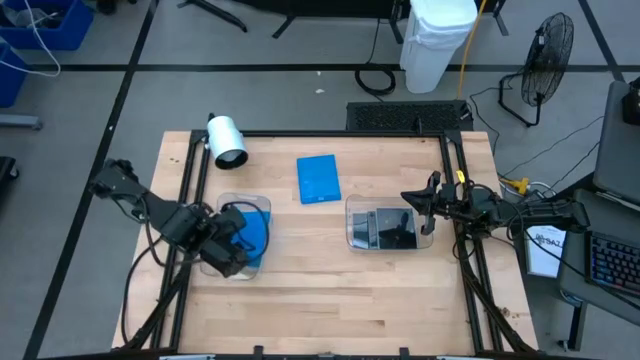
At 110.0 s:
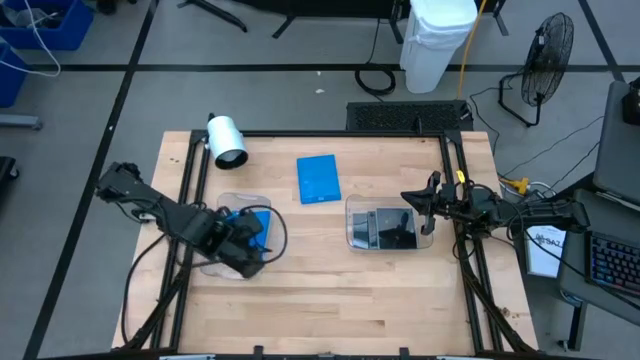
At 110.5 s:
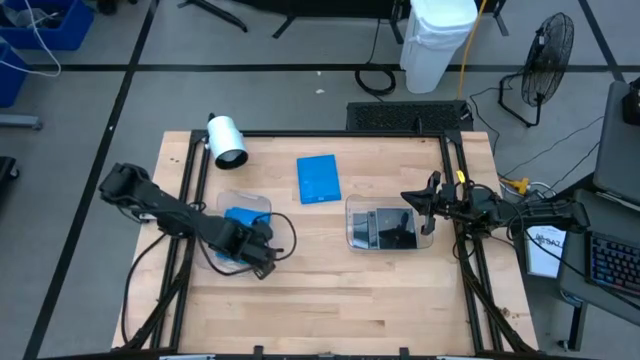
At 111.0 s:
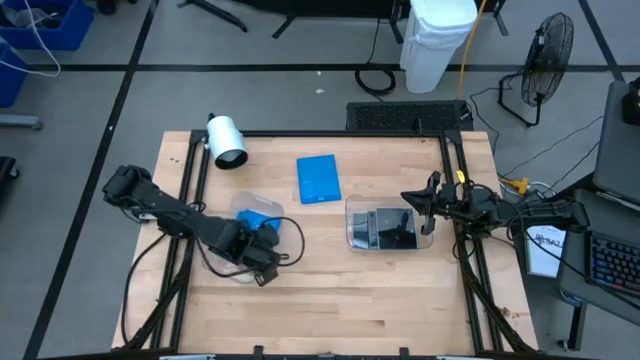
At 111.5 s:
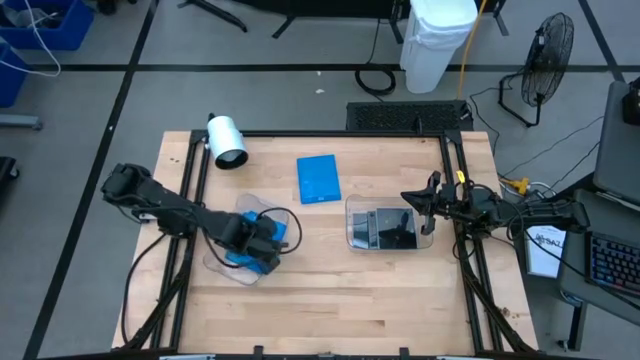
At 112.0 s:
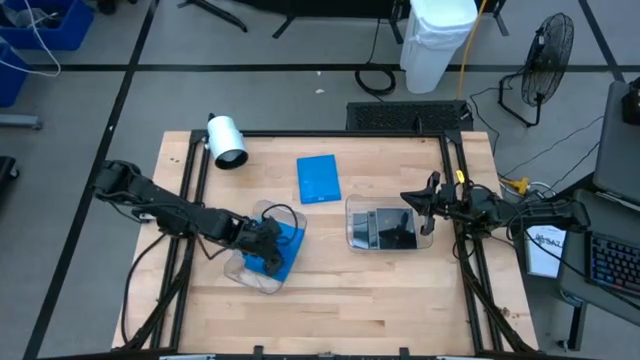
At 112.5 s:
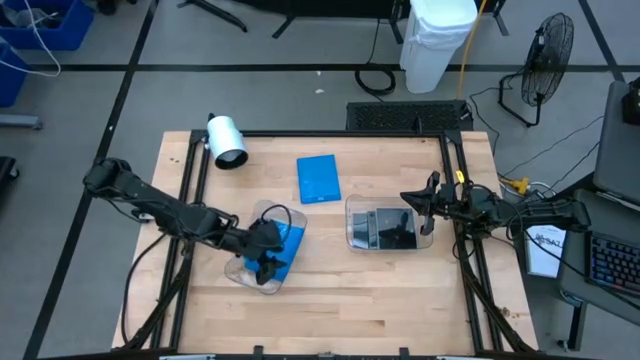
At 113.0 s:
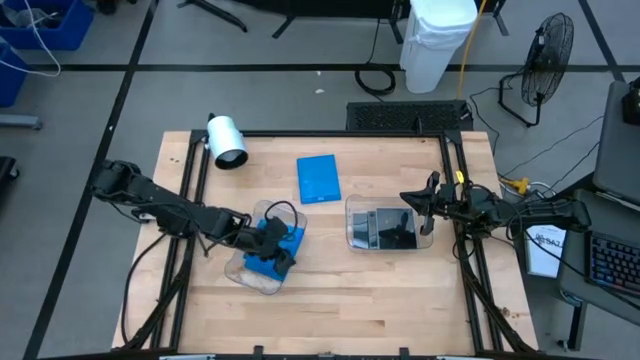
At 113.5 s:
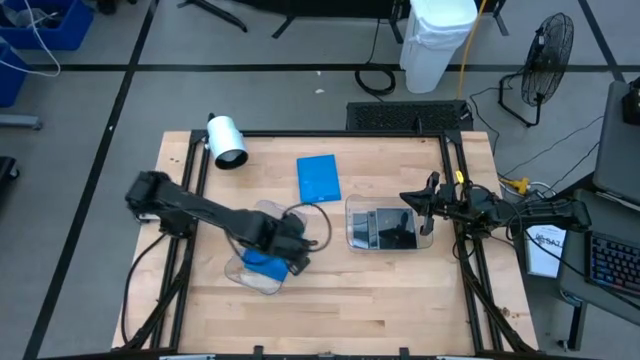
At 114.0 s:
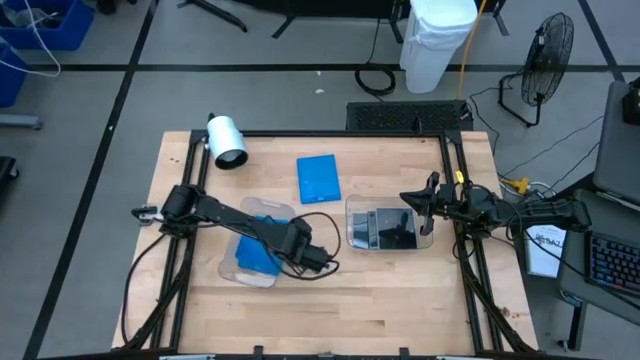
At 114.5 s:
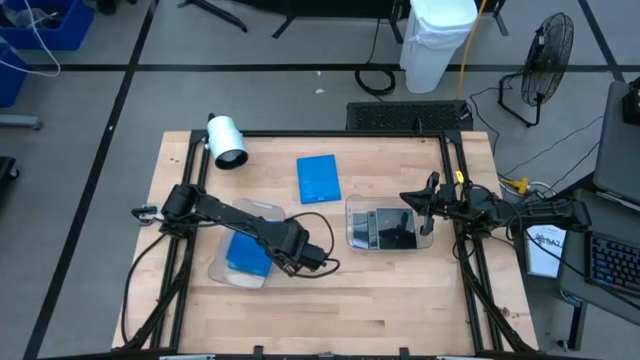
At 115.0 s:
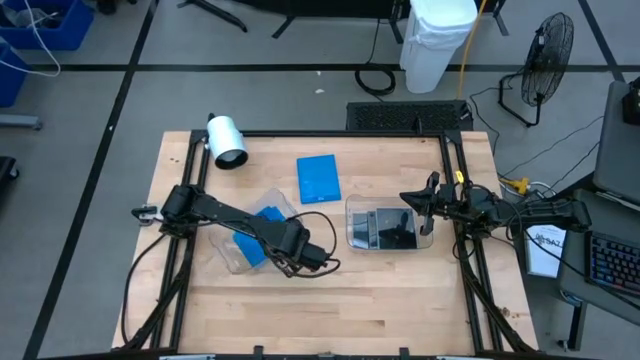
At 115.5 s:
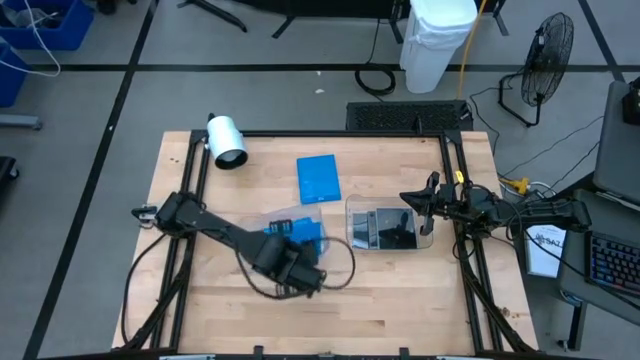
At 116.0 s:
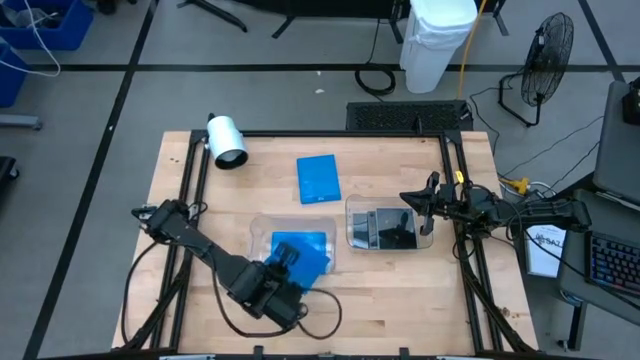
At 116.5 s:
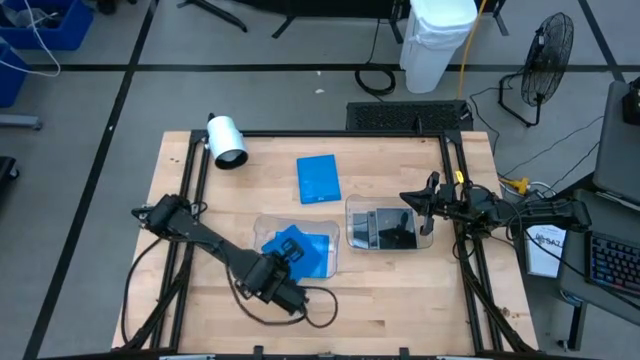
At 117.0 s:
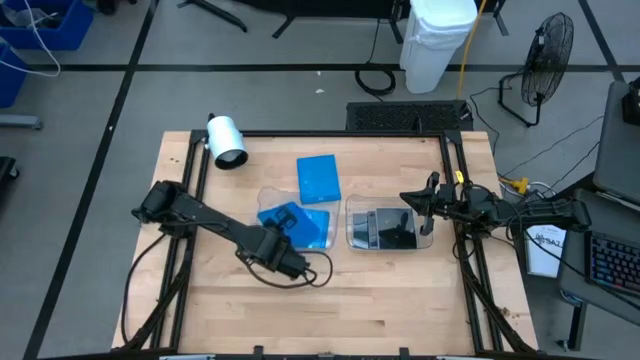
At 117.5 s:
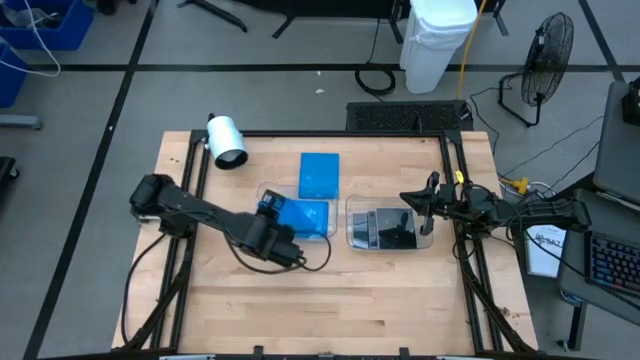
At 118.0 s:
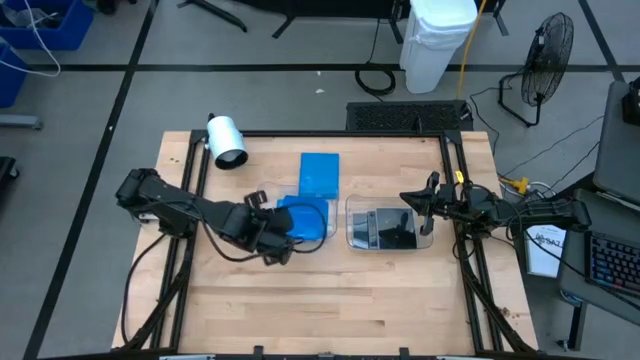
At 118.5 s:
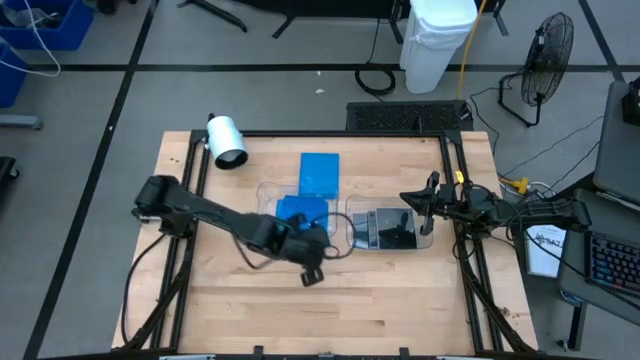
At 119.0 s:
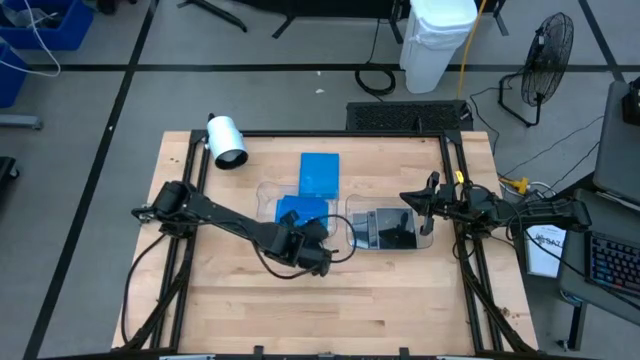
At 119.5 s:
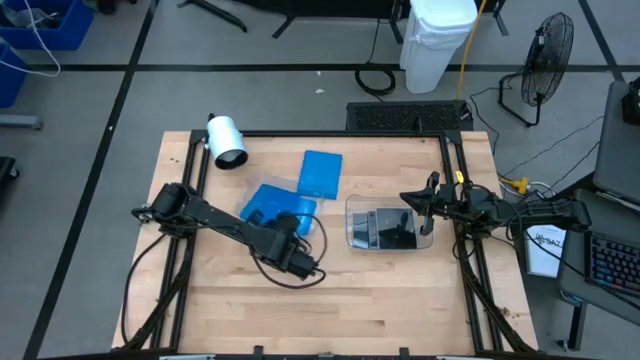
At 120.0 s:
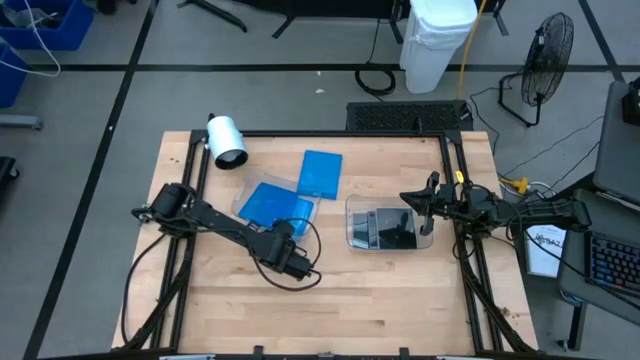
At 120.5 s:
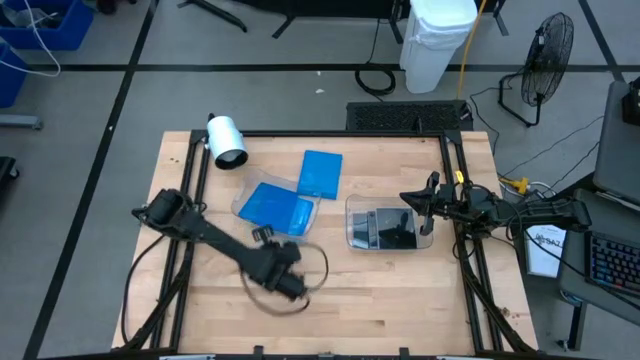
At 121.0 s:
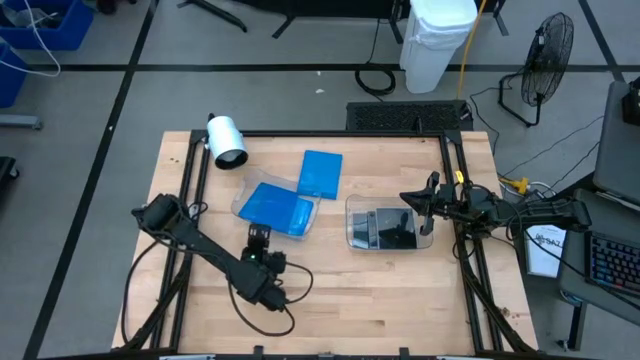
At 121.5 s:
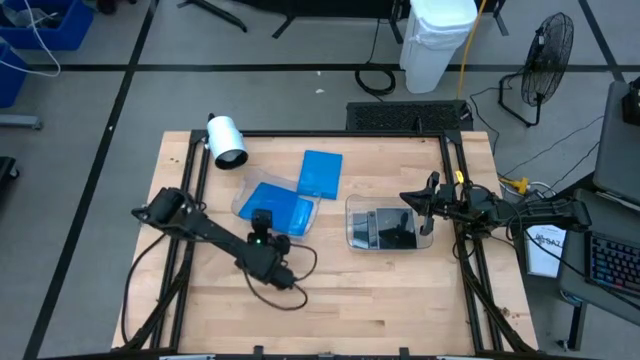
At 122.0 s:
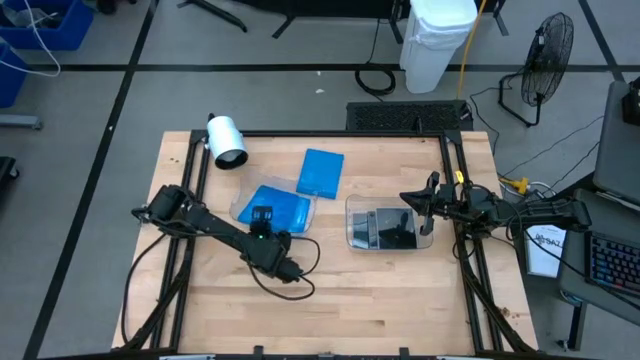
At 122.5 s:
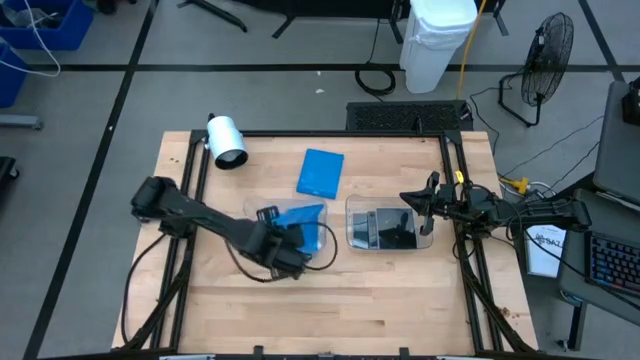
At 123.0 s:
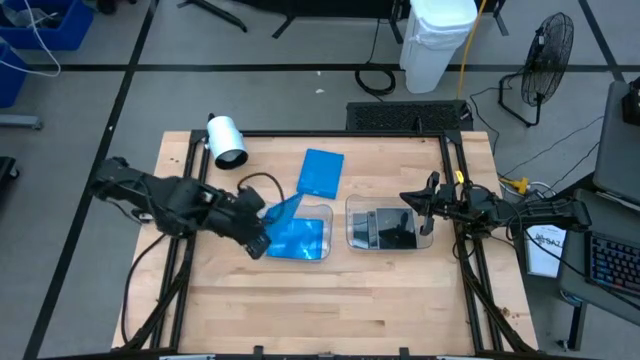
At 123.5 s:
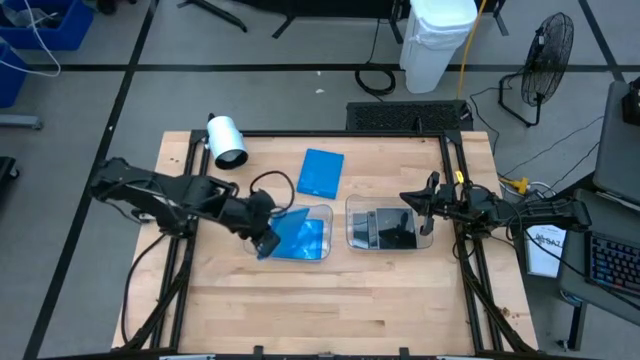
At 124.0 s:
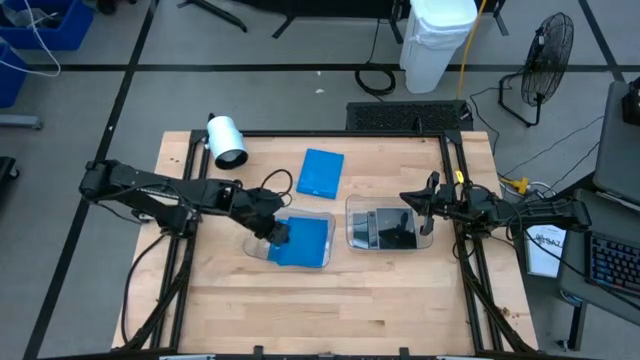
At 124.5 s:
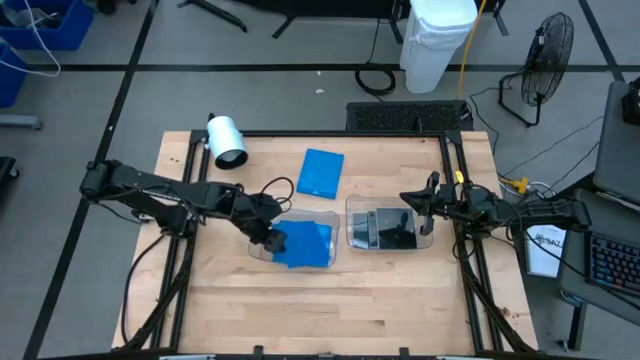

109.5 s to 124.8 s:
Task: Pick & place jewel cases by type
Put the blue CD case into the left transparent bin

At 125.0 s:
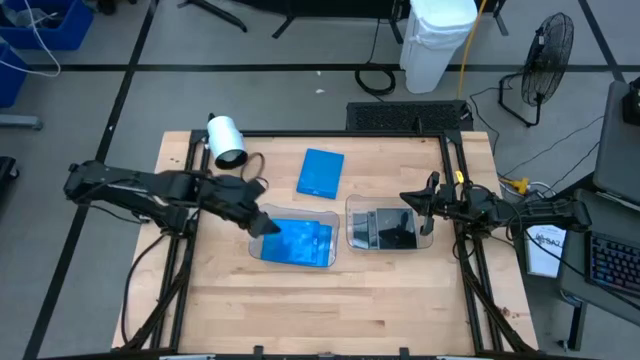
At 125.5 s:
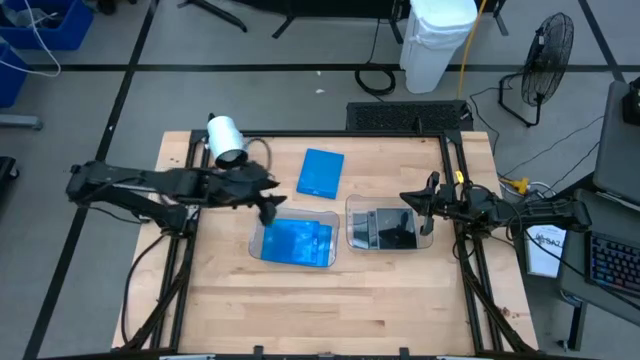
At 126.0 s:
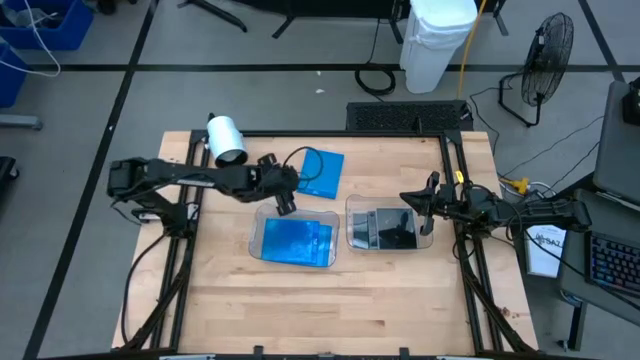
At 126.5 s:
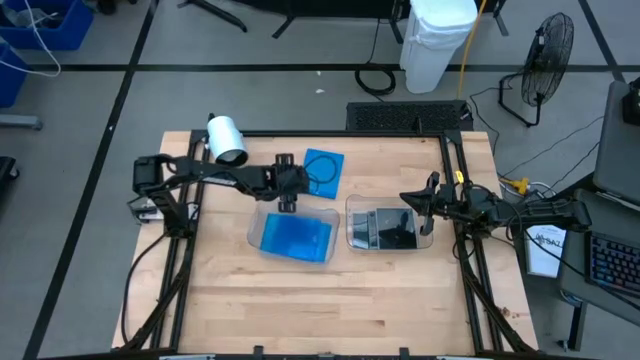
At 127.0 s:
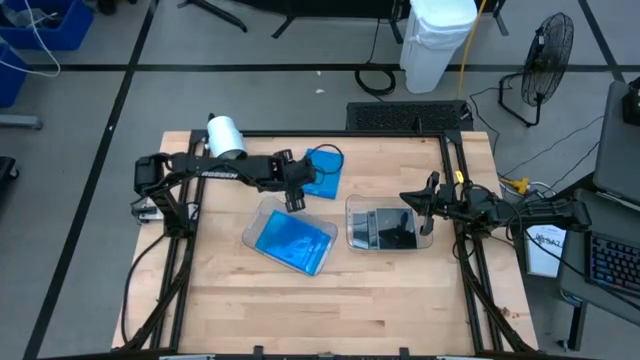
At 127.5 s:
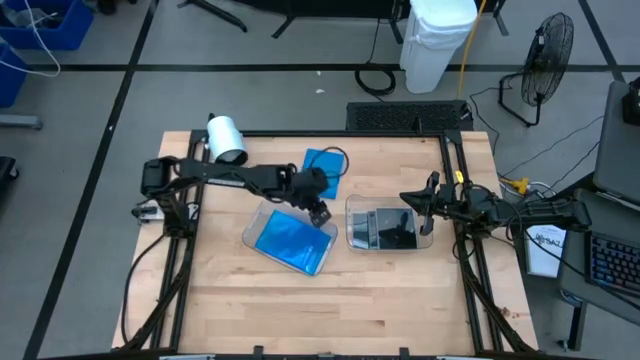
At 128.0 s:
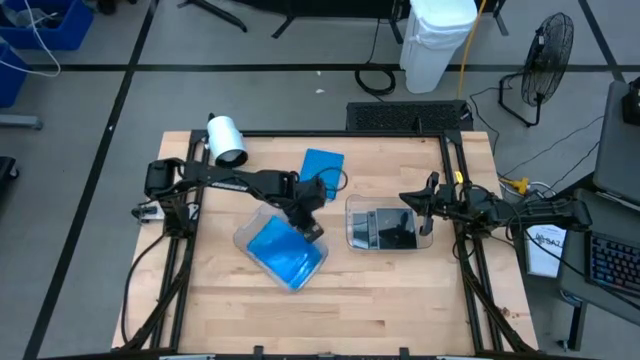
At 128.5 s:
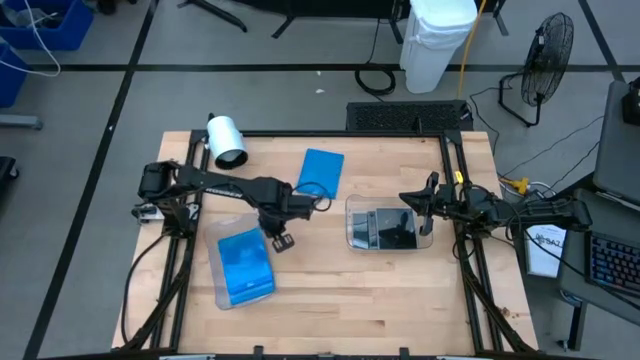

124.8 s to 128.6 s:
Adjust the left transparent bin

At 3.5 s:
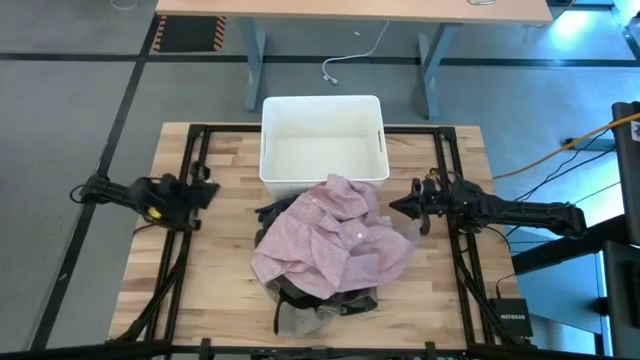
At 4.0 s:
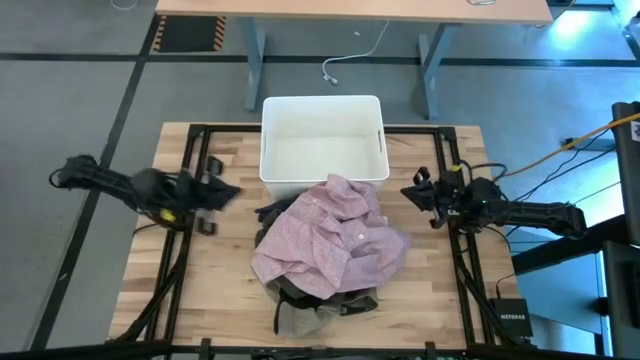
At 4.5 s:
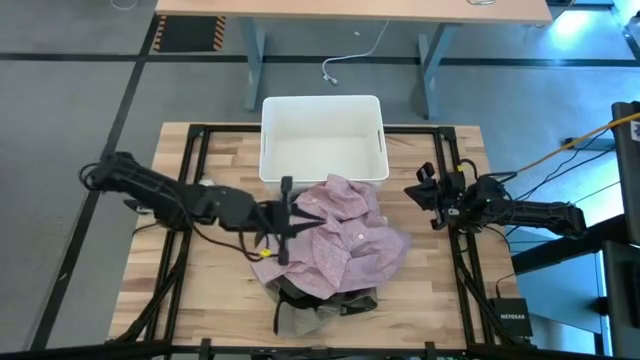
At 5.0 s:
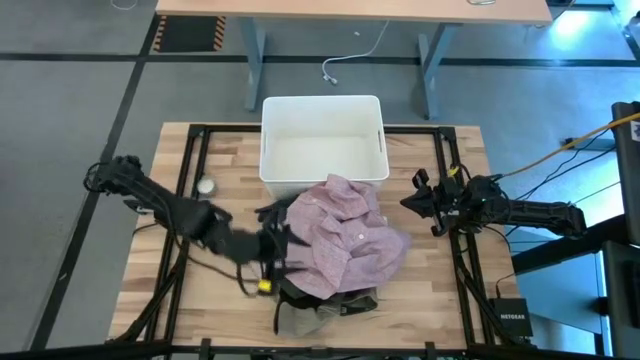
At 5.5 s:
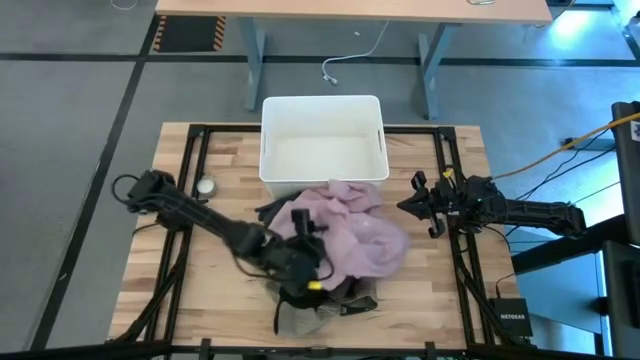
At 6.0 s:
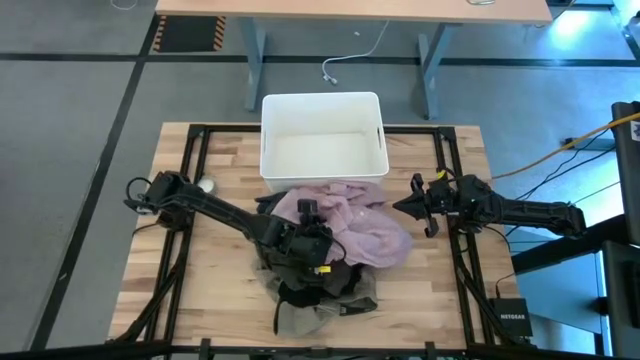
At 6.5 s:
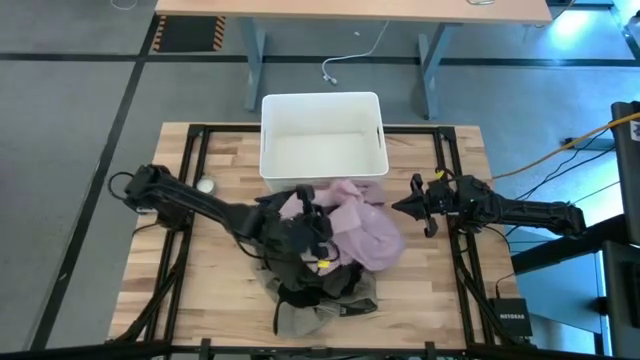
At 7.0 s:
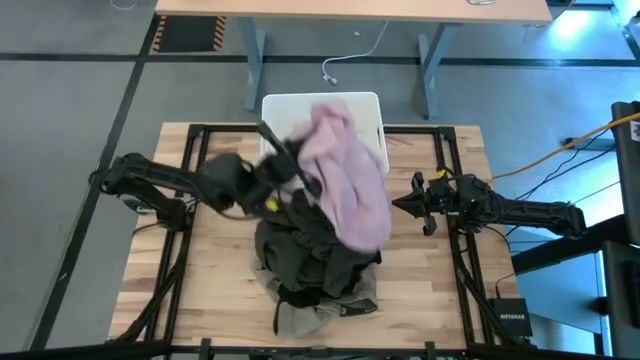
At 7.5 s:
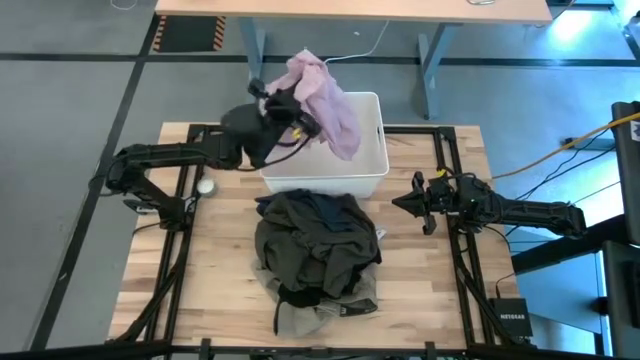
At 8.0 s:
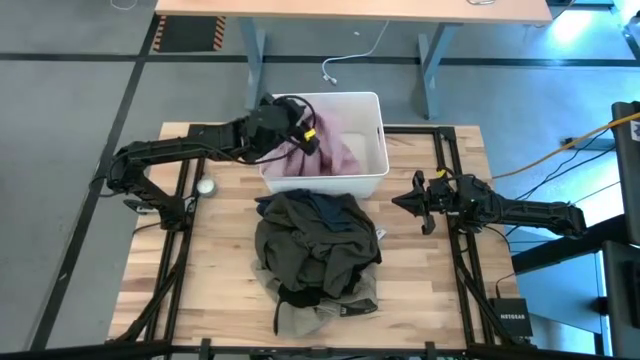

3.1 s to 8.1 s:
Task: Sort clothes
Put the pink polo into the white bin
